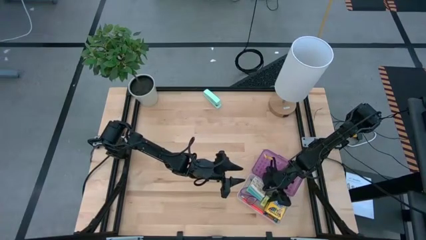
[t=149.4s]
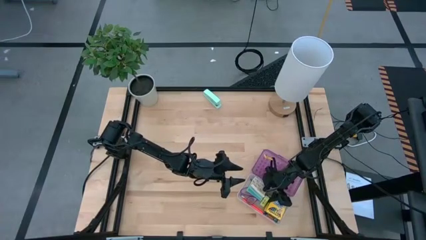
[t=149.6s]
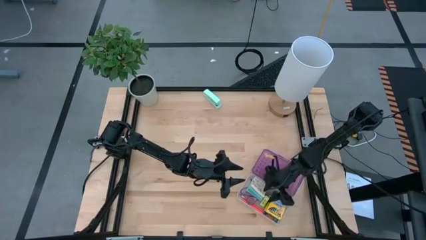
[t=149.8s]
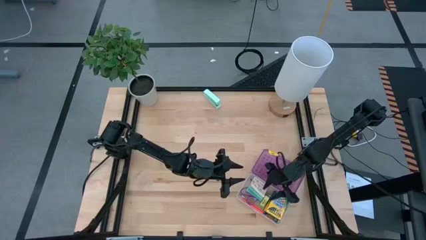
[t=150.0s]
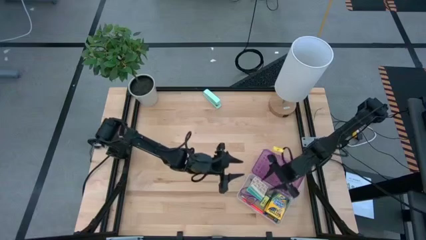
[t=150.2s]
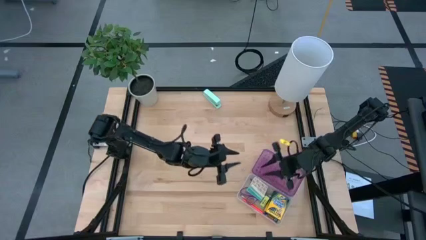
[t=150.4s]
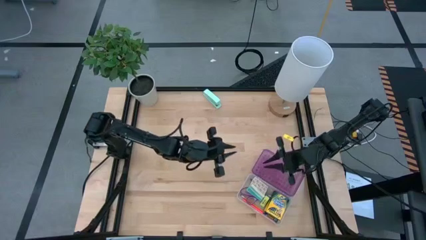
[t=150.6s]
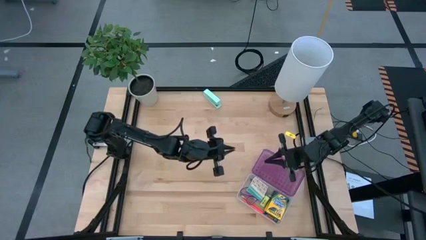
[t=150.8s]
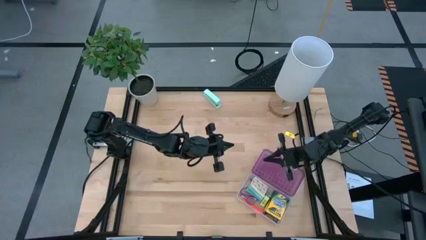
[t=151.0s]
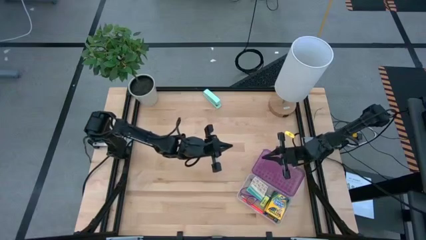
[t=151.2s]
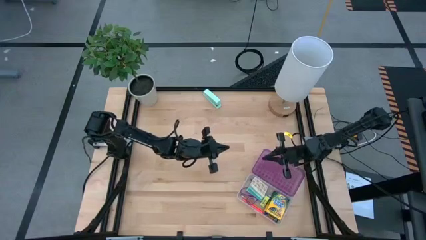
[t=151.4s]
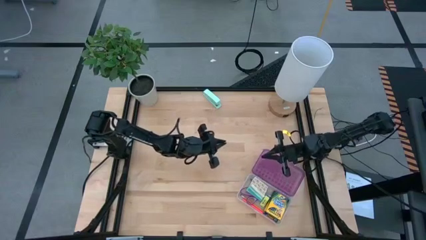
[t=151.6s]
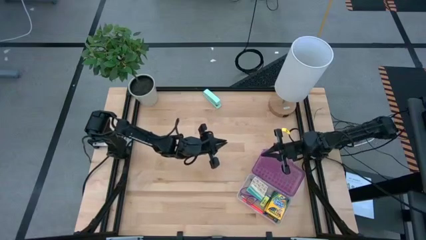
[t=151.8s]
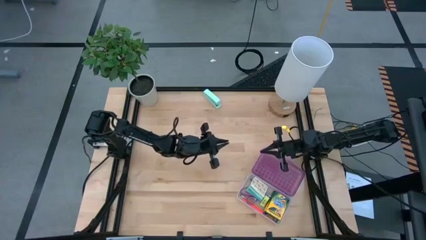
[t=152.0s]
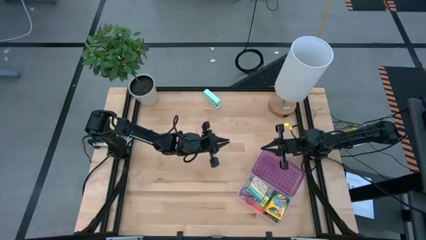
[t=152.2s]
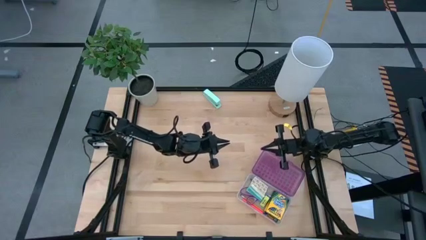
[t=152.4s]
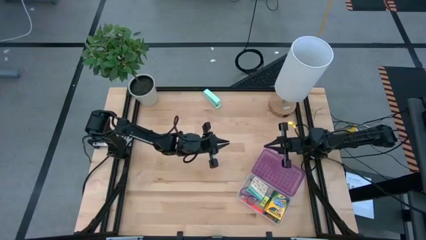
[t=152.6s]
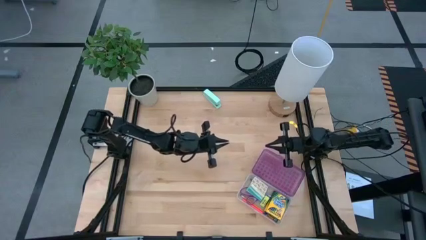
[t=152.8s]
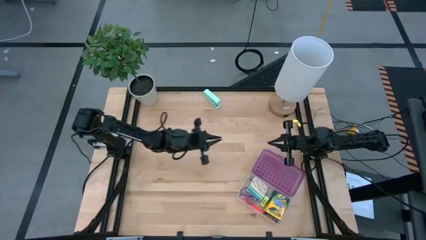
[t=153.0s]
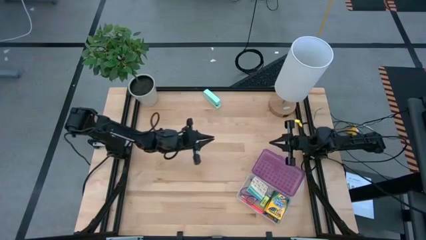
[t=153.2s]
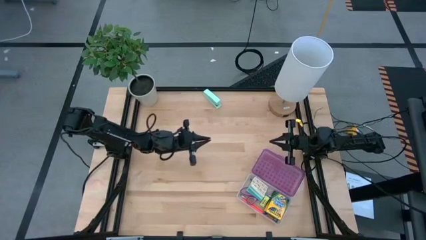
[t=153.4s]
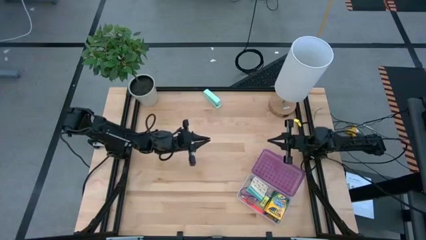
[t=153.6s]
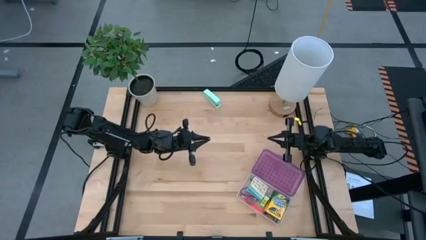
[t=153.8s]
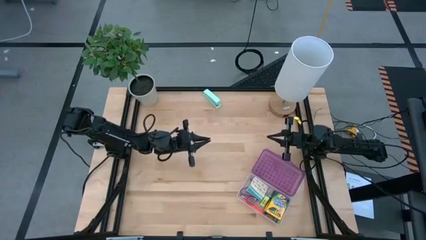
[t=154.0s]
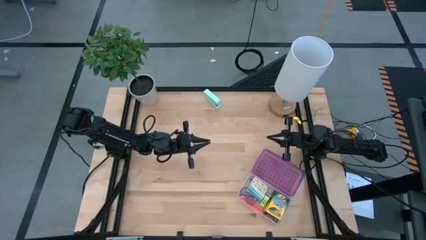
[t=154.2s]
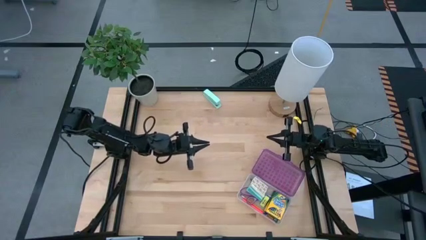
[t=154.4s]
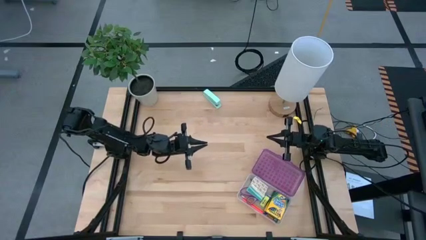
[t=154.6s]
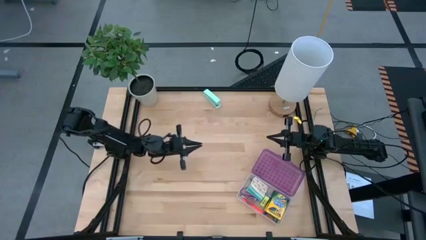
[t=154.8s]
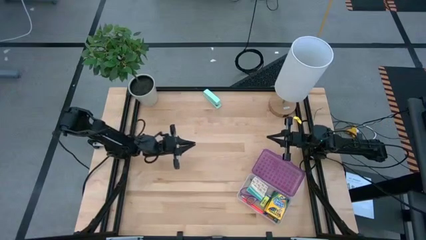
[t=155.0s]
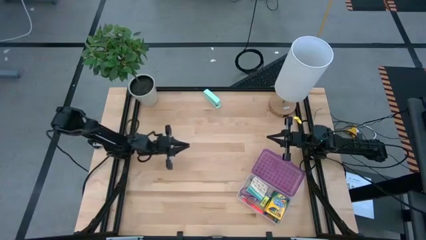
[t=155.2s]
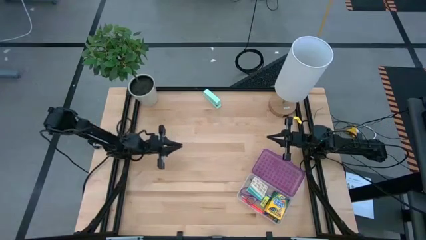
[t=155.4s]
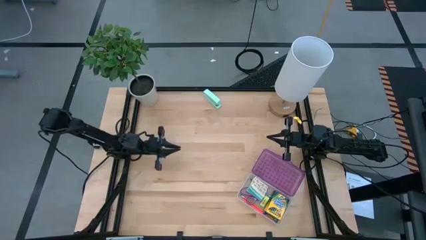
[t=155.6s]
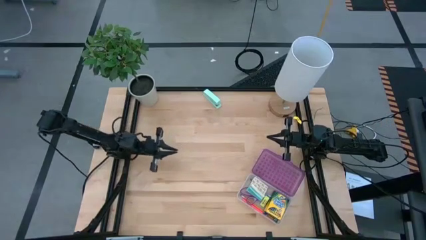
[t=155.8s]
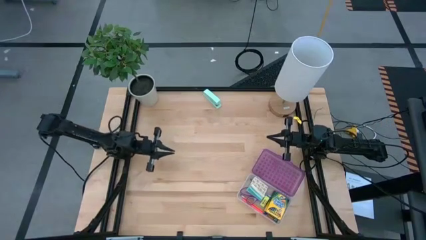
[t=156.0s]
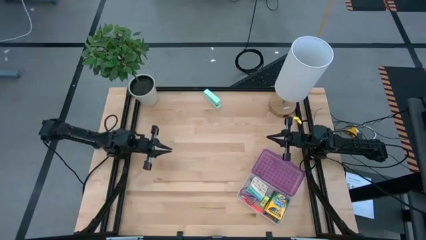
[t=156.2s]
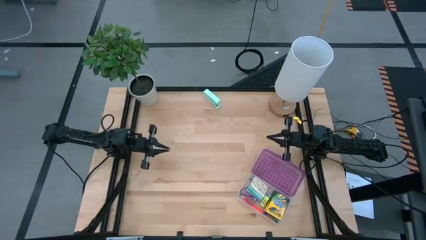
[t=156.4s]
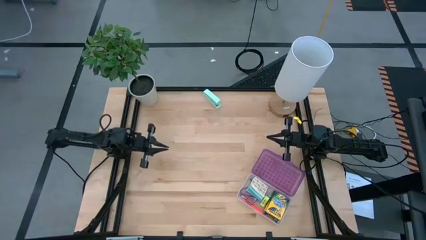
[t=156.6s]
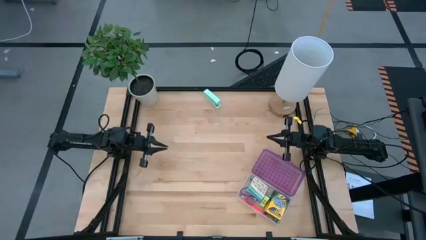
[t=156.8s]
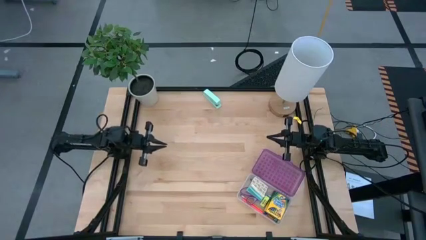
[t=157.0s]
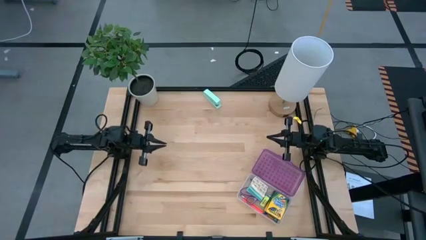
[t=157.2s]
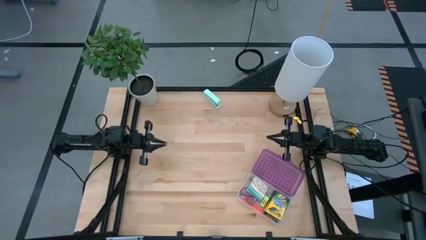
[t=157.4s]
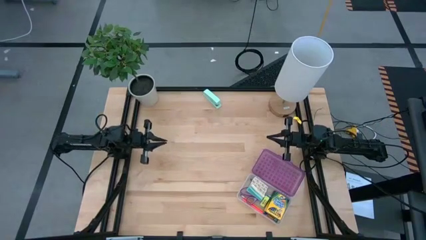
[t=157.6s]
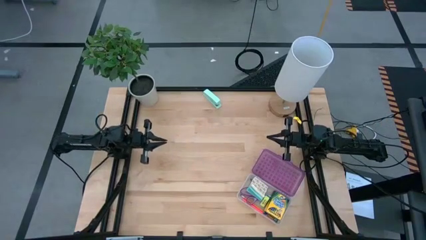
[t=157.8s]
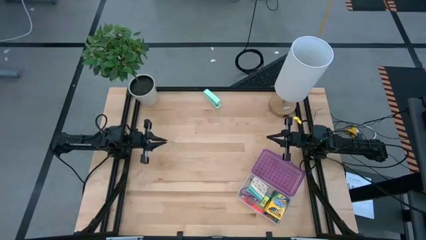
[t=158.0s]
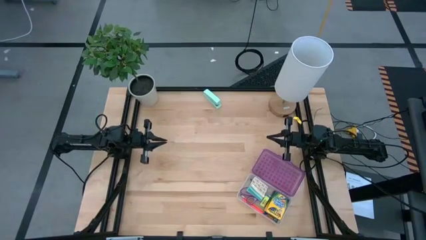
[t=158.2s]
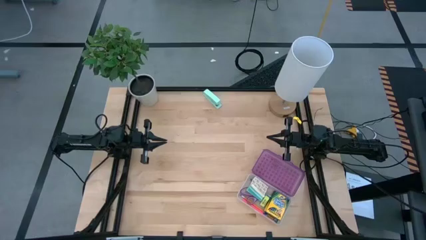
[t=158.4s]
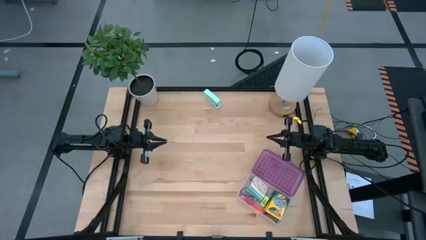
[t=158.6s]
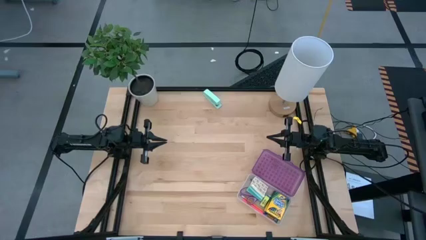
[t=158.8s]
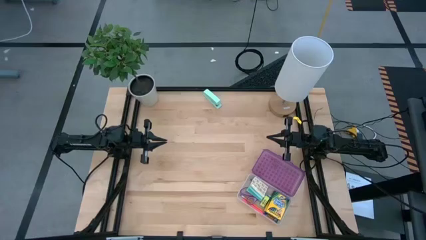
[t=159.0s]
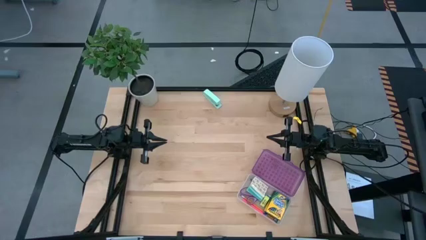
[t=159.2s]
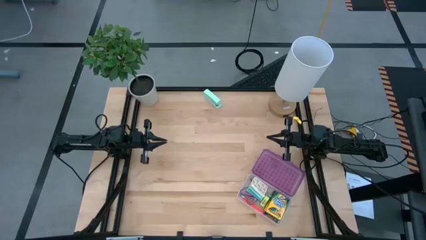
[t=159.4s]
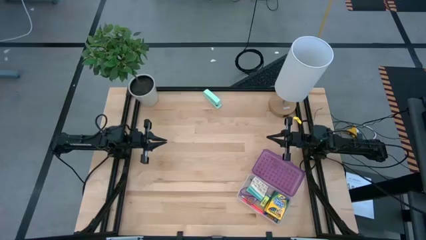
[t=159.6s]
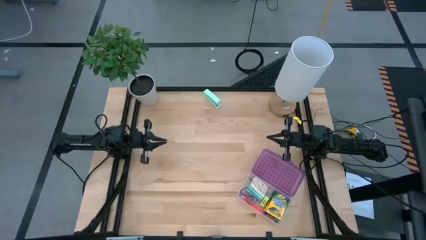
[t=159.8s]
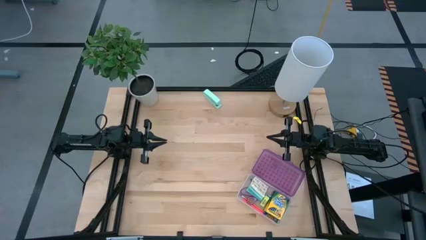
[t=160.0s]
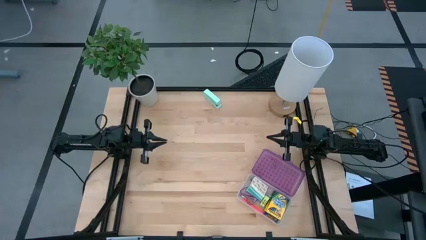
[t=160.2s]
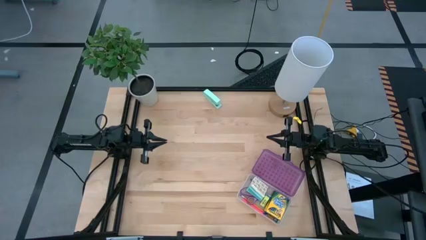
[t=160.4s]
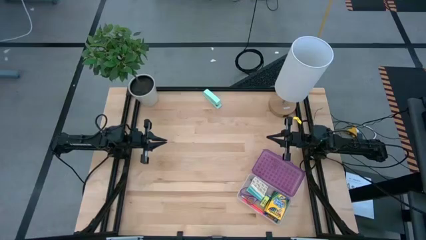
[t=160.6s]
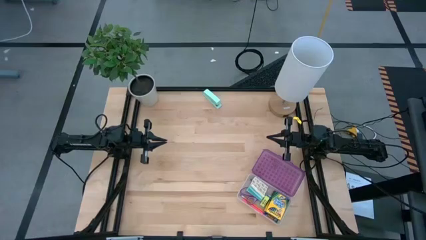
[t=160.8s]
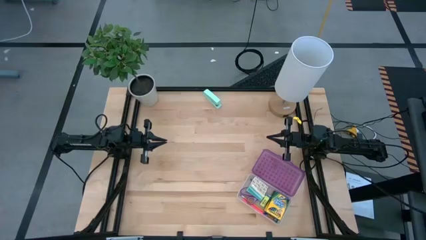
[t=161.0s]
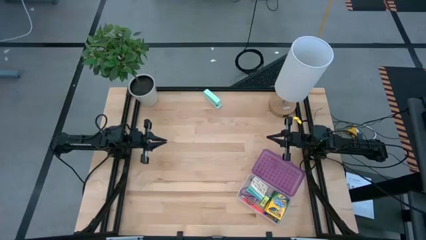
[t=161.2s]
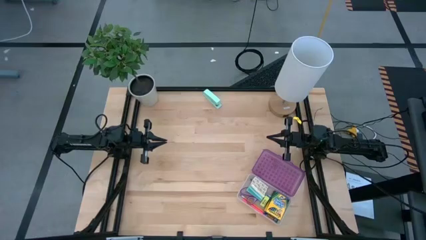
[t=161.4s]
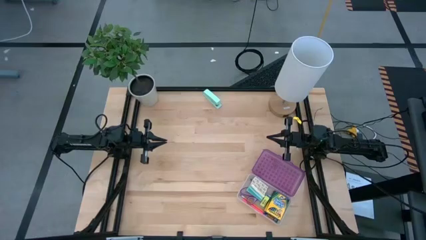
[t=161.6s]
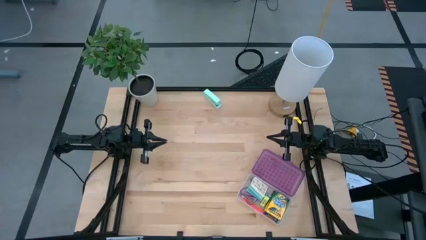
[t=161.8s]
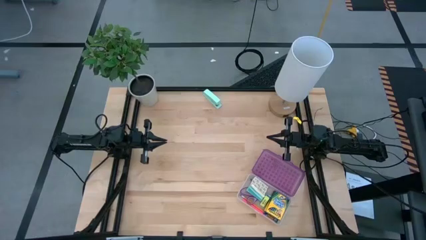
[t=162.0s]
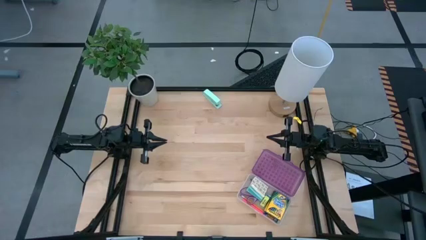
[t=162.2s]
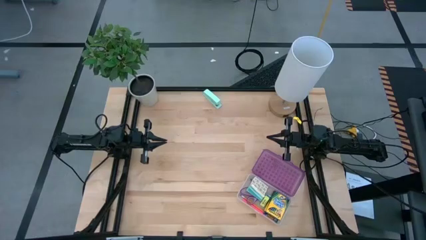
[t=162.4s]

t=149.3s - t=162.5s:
Task: Pack school essentials
Return to Home Position

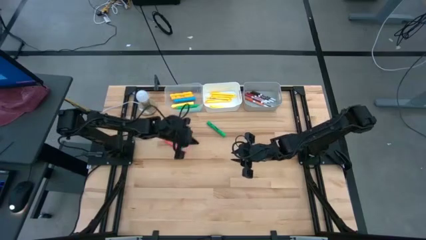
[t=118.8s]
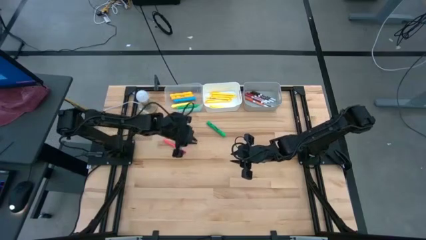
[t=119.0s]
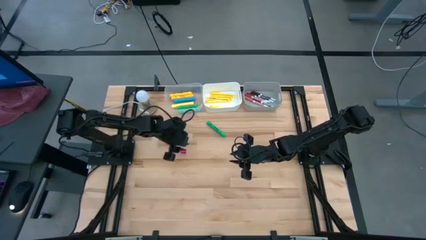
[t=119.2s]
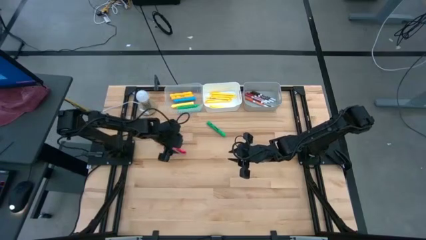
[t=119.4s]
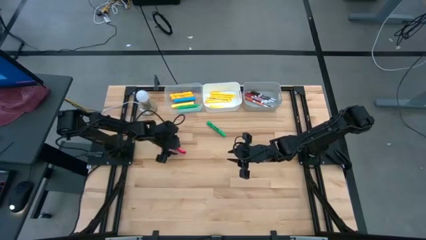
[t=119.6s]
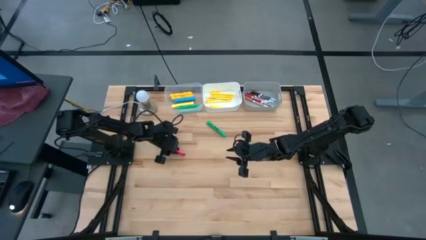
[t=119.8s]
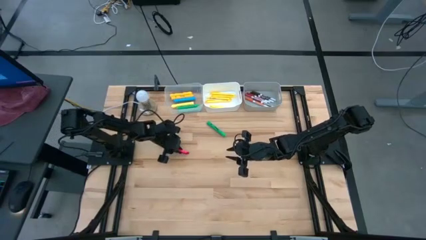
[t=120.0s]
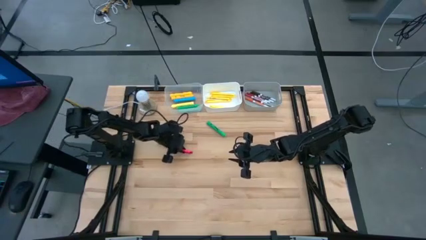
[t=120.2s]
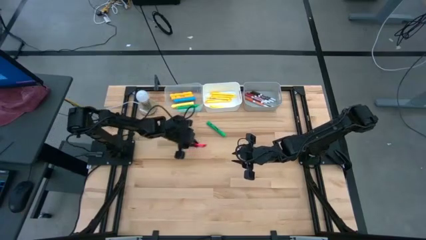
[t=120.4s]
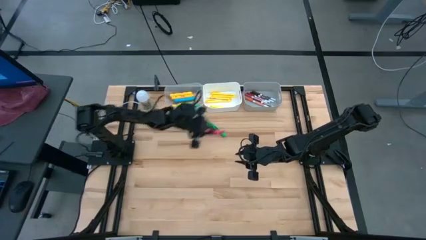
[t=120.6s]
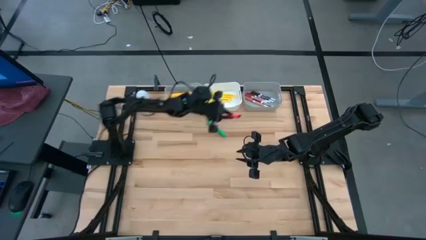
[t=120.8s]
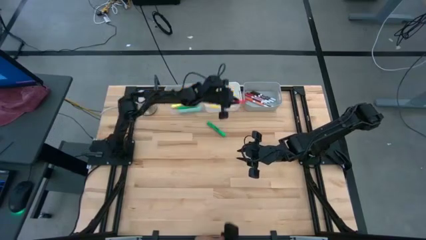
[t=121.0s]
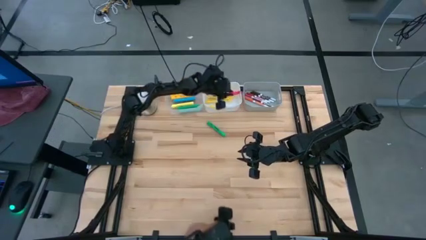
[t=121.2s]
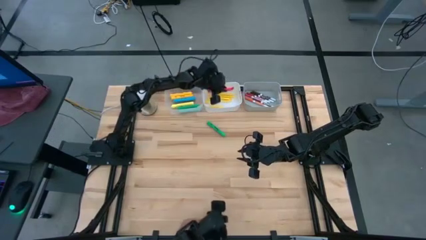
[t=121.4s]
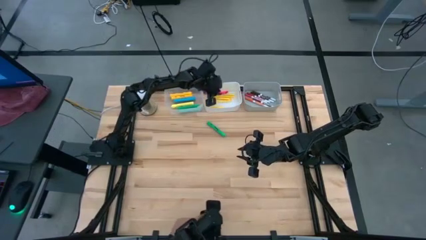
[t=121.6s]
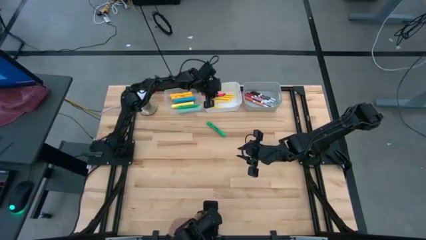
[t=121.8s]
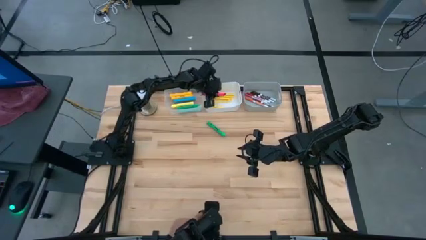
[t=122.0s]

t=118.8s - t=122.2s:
Task: Pick & Place Markers
Put the pink pen into the white bin
